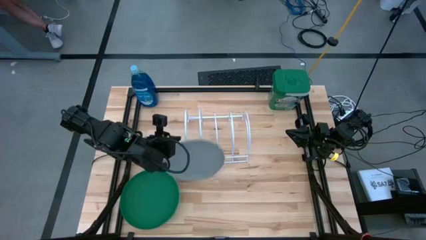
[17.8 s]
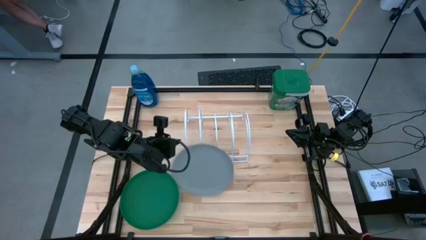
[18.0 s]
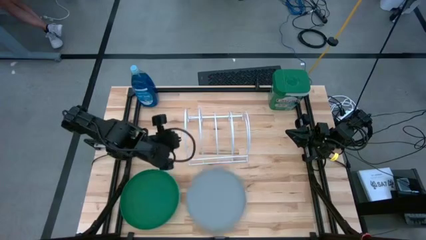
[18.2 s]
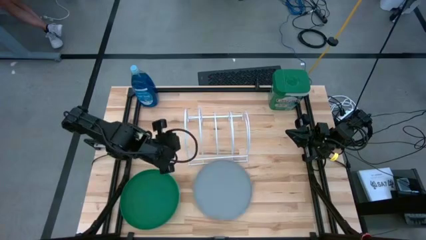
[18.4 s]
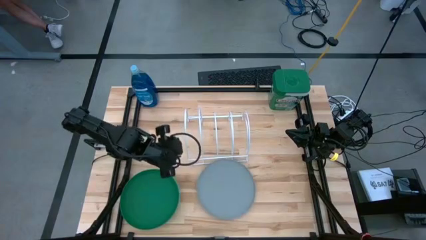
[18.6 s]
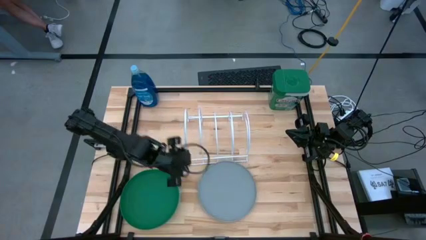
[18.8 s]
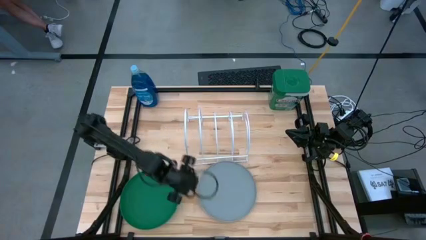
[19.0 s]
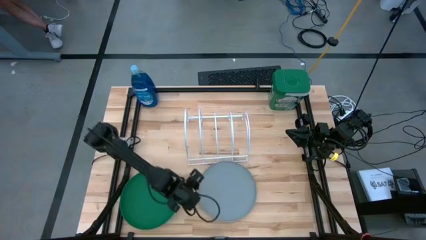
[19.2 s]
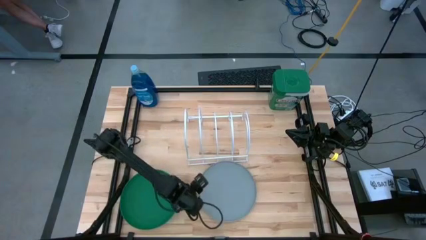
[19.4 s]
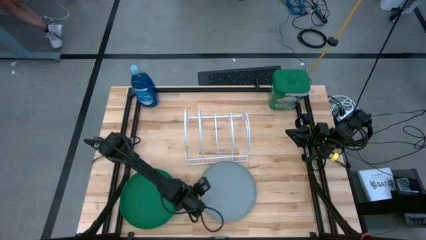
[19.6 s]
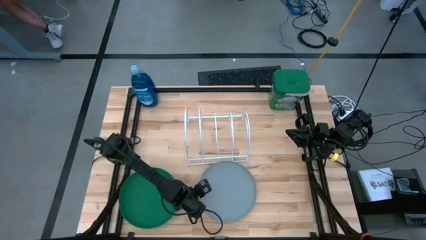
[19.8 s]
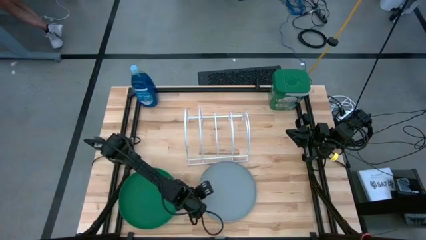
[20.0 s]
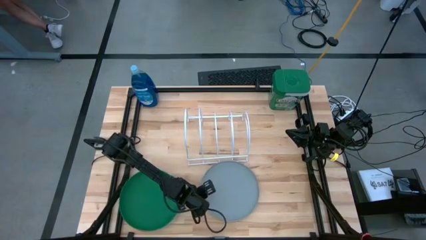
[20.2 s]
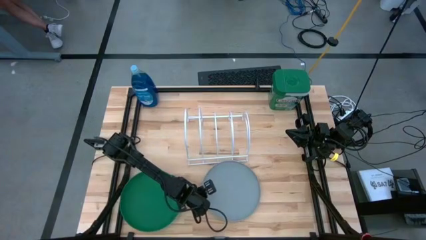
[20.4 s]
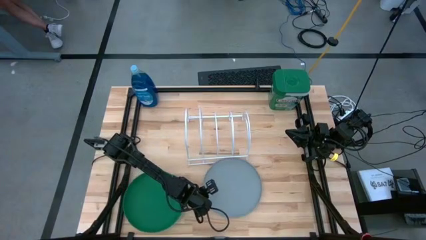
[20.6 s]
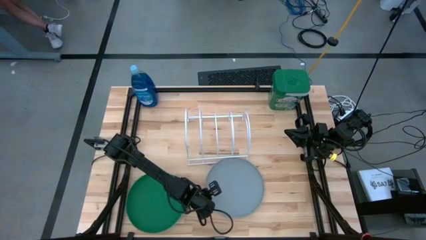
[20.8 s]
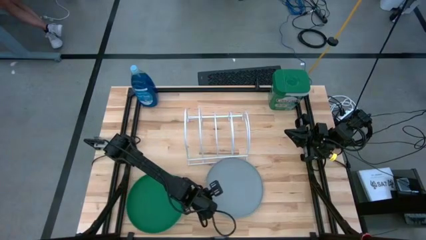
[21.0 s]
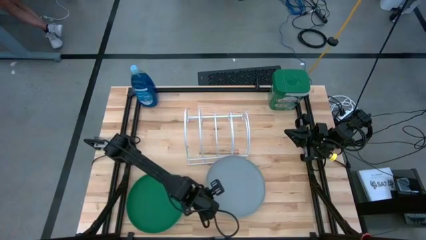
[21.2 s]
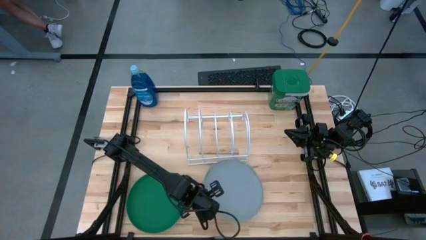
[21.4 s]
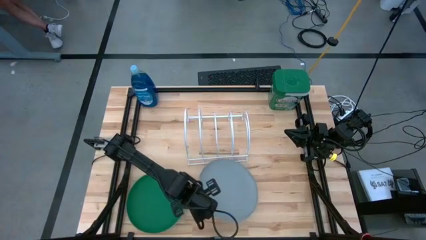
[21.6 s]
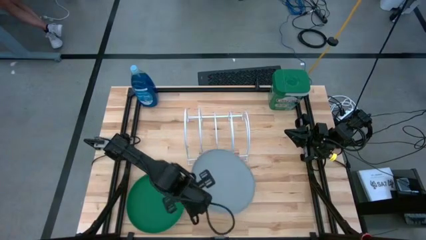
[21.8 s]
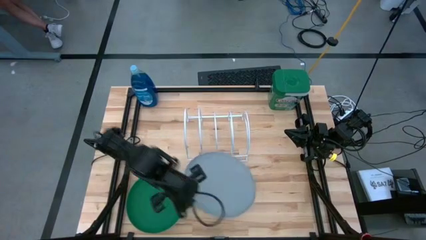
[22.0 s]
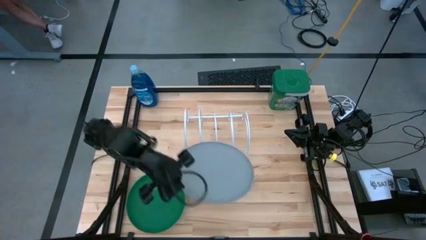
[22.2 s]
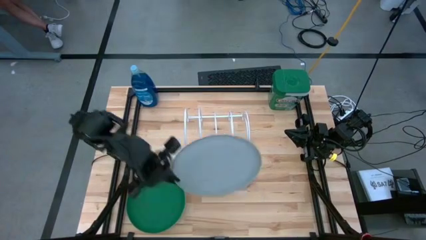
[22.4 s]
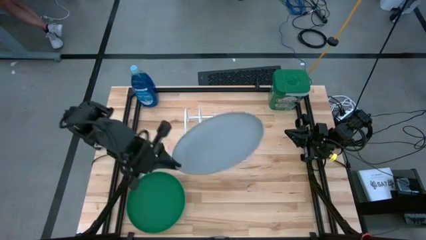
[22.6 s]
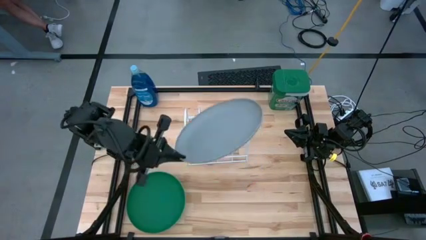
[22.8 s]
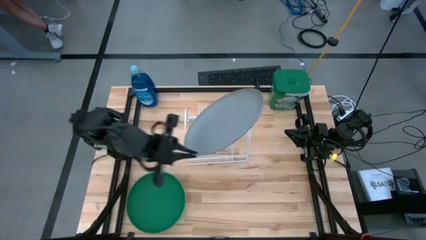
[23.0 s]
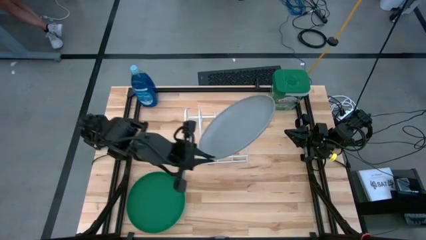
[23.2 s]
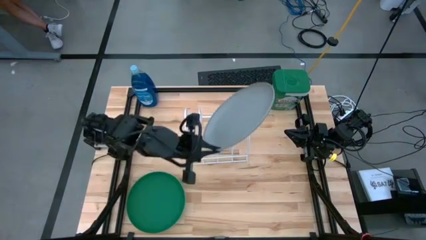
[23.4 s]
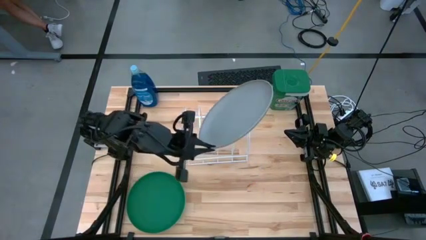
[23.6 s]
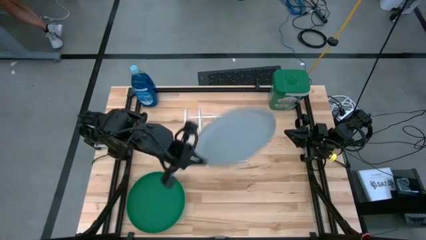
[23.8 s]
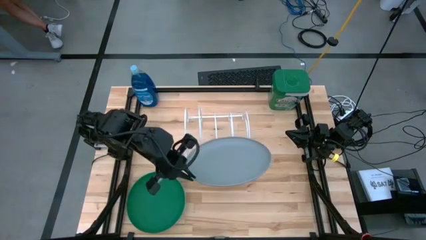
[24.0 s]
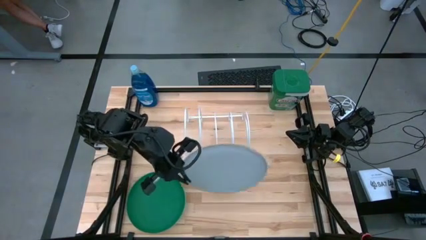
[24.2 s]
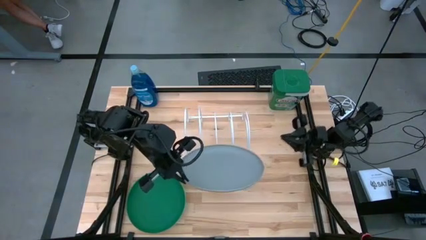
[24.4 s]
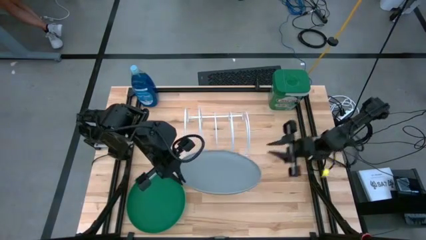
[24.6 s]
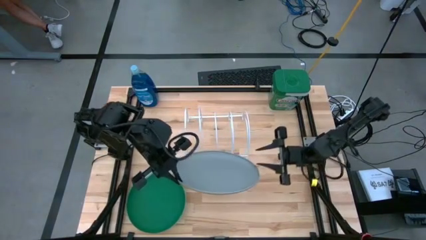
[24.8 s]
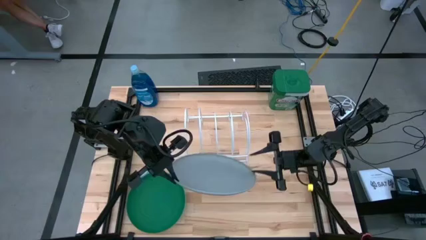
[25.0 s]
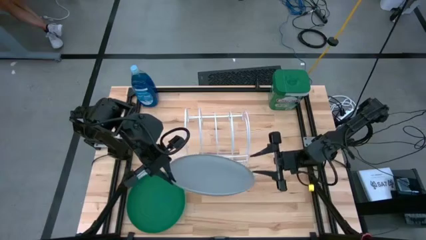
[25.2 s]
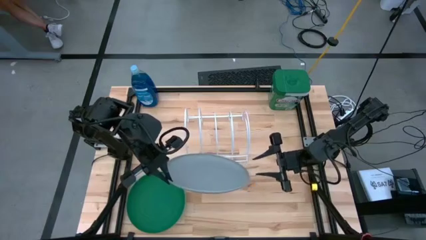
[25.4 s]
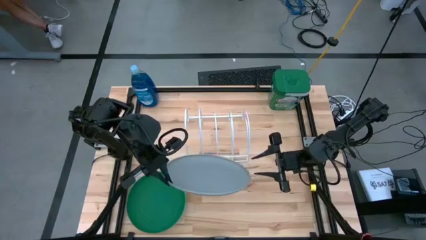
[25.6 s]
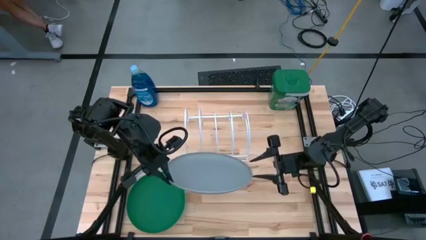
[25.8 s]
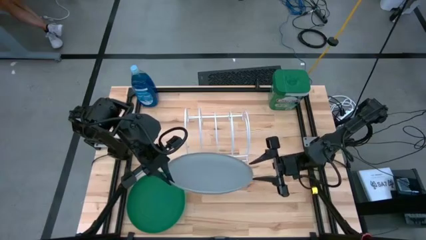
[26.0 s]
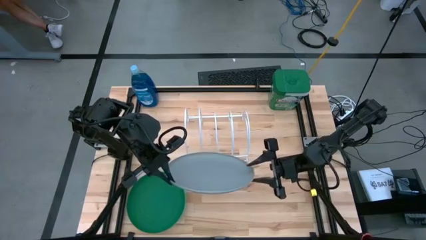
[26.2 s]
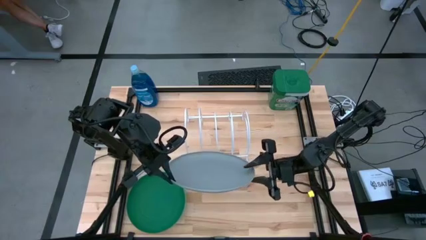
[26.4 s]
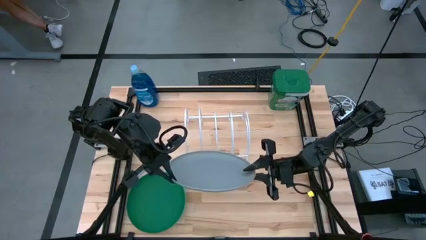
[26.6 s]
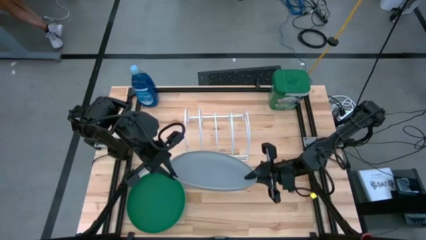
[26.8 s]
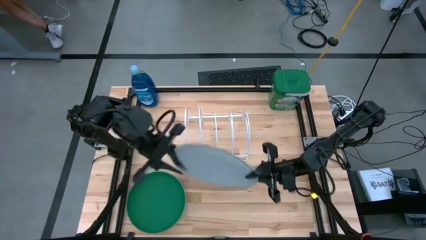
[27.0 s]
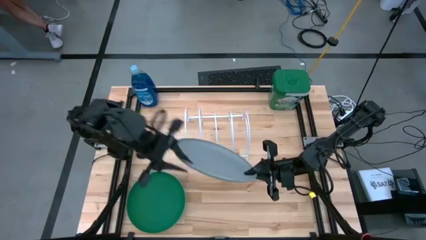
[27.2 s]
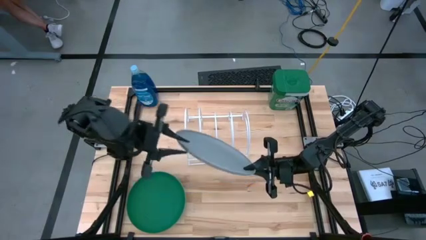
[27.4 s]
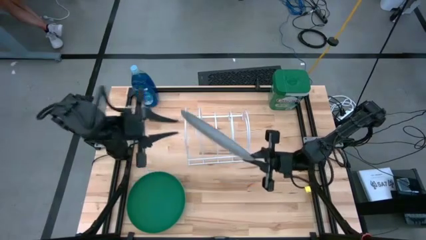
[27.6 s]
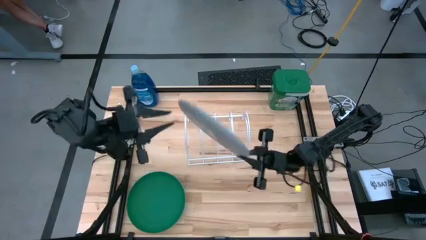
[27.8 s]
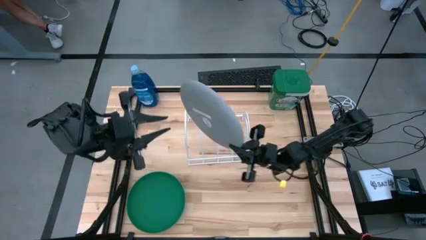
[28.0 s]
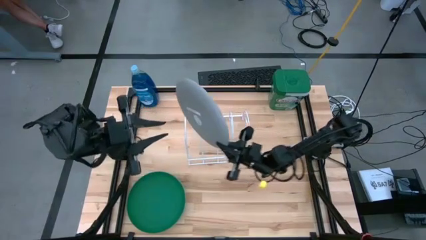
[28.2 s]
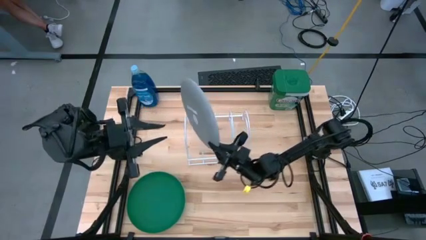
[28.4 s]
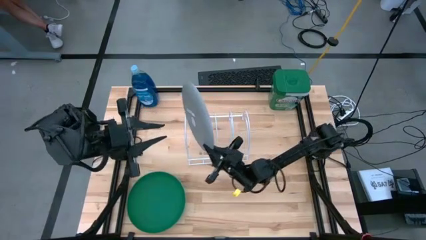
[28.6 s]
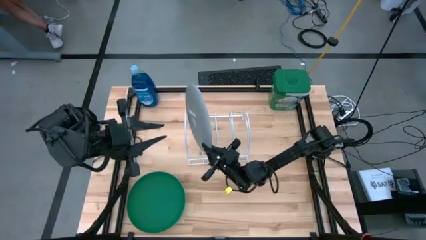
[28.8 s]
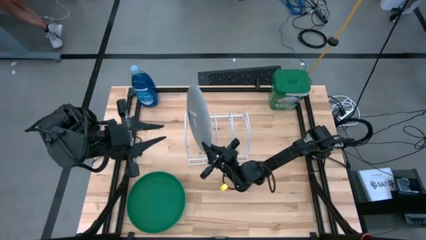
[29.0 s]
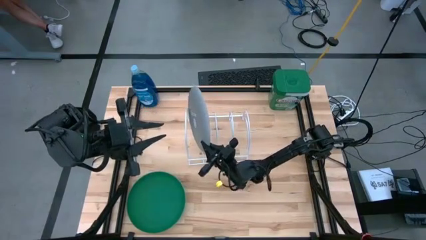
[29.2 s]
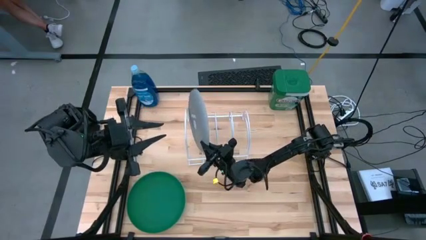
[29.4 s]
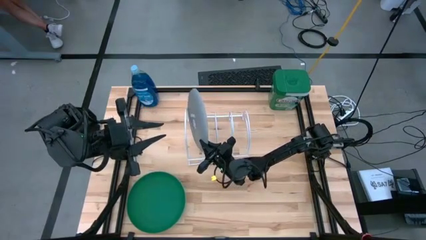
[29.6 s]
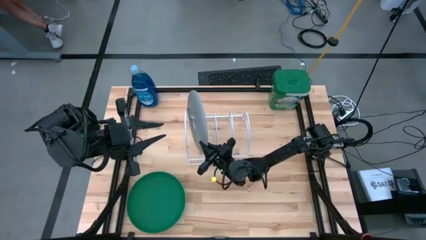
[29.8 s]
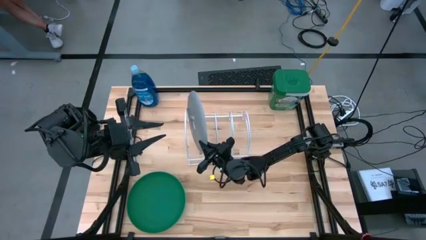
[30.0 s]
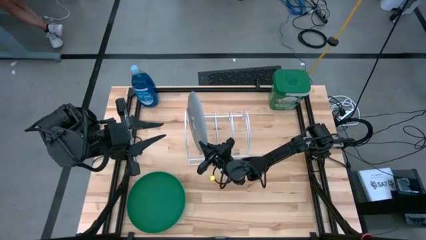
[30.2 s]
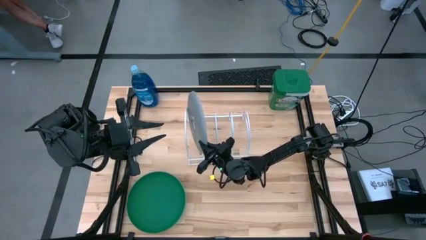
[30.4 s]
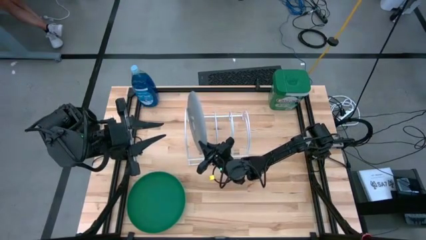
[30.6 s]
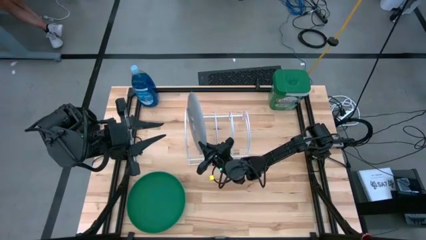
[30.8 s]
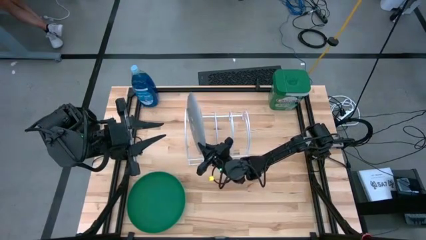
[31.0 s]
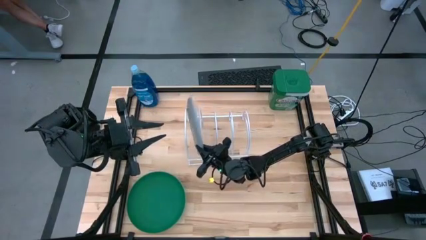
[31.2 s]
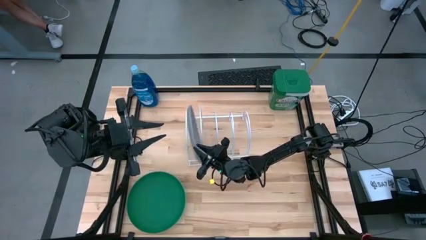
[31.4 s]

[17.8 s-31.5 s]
Task: Sort dishes
Put the gray plate into the dish rack
